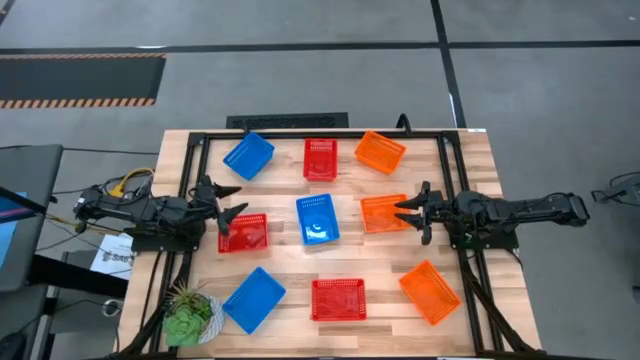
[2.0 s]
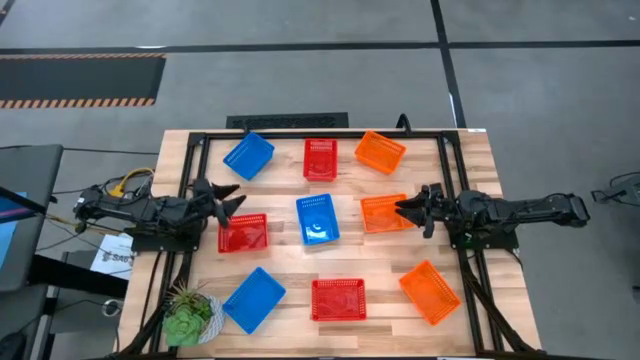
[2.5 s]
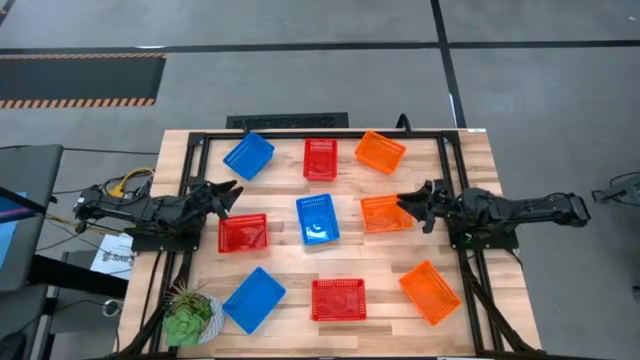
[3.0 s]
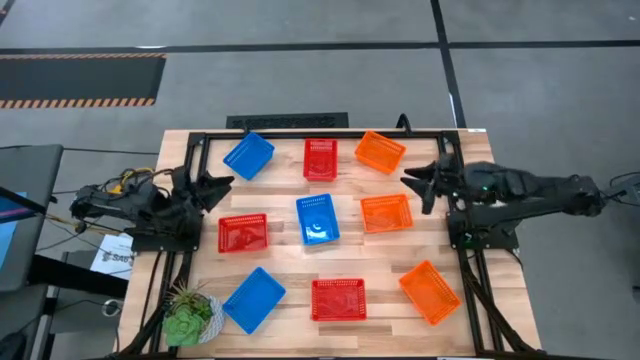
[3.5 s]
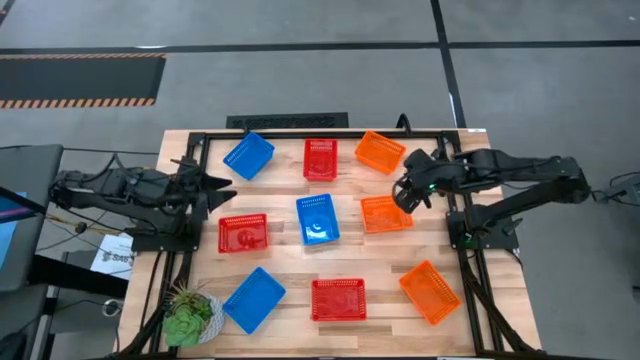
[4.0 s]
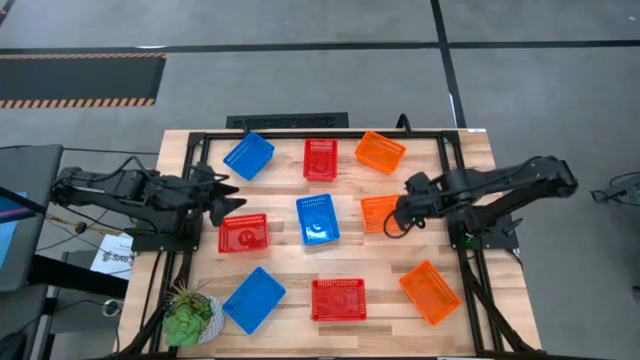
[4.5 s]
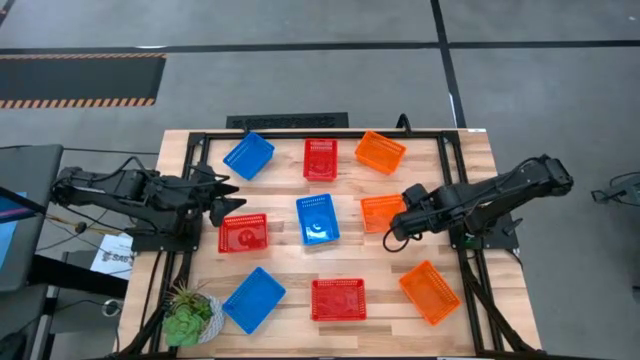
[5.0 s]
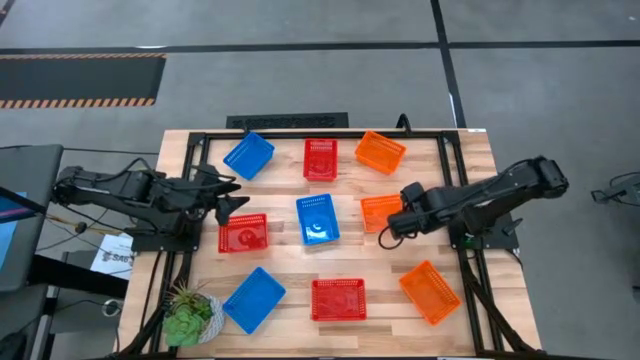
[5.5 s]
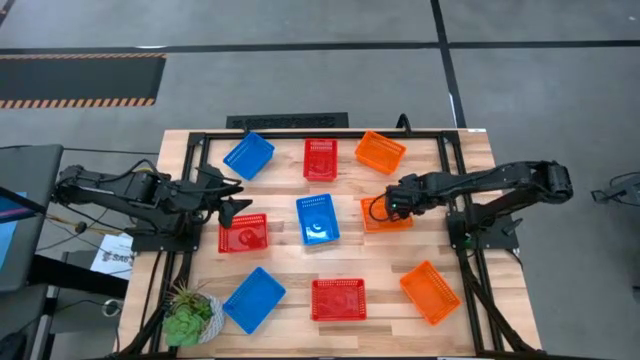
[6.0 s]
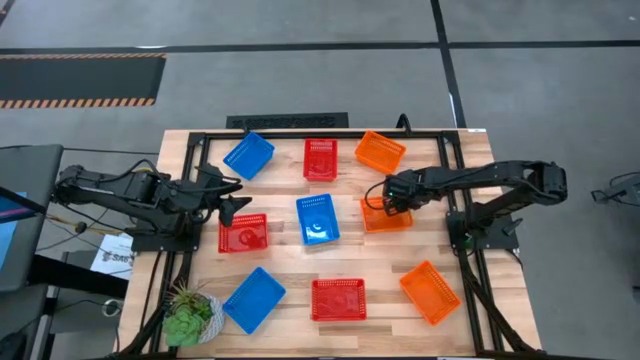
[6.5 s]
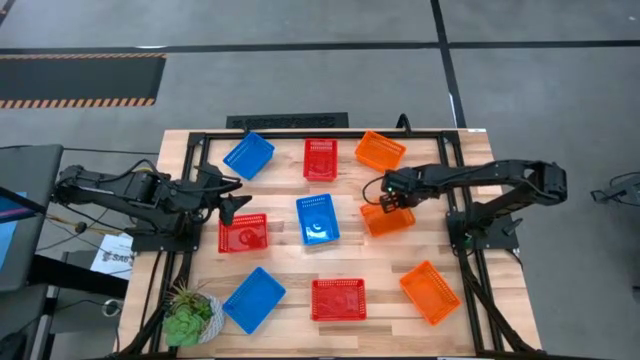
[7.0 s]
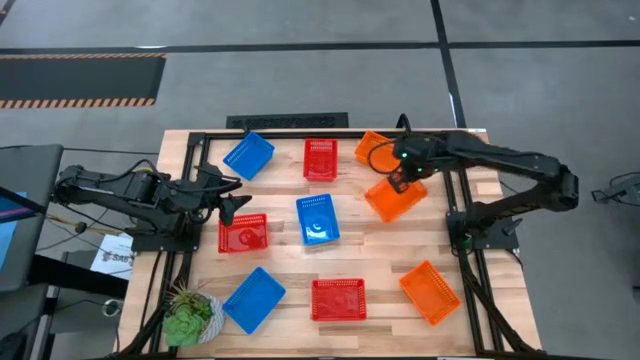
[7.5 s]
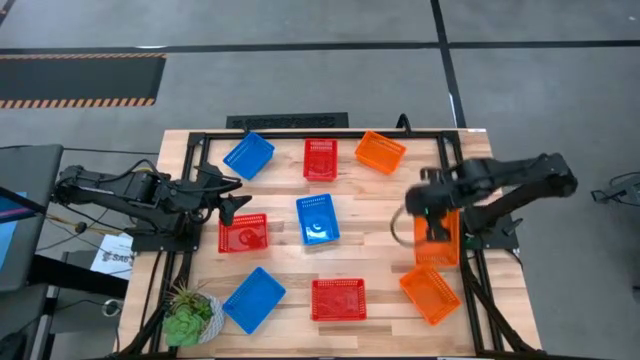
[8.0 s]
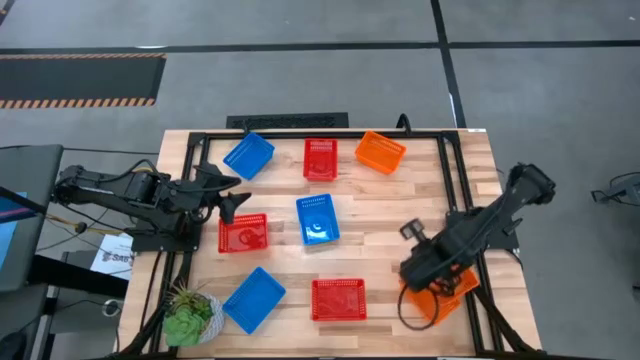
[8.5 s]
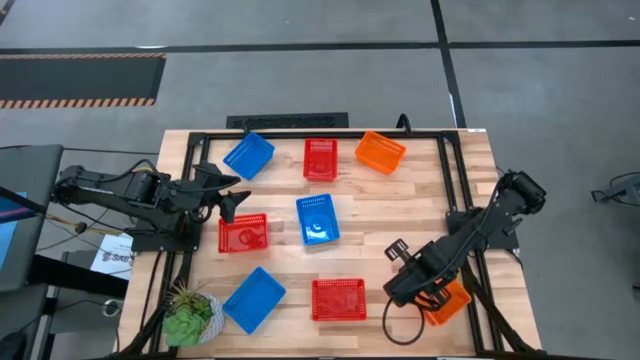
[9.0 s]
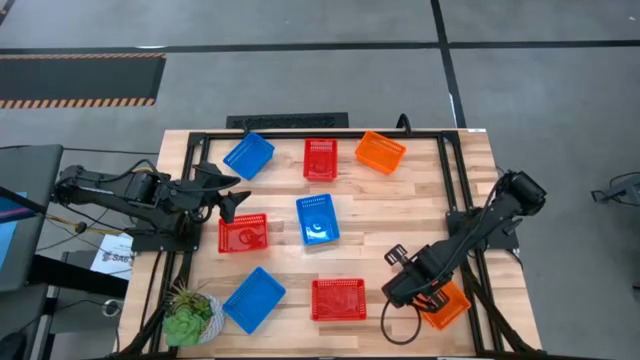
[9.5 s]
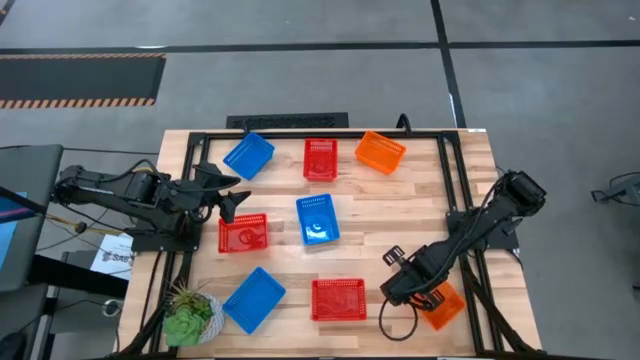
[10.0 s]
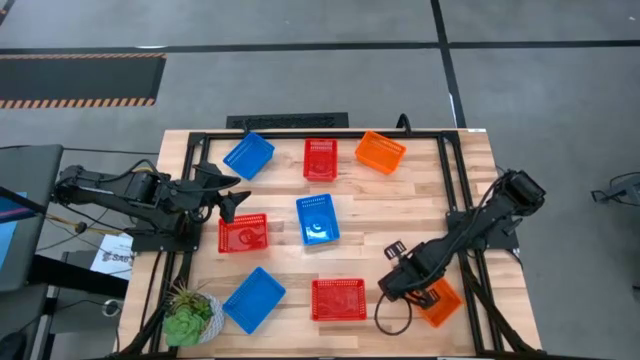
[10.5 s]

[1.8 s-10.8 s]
Stack the middle orange bin into the bottom orange bin

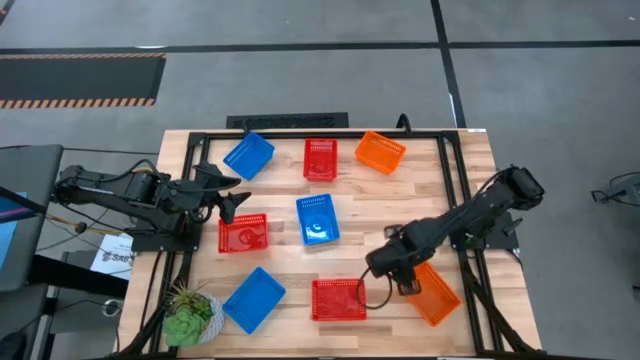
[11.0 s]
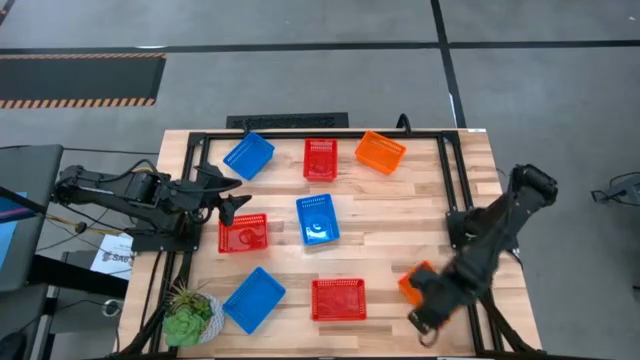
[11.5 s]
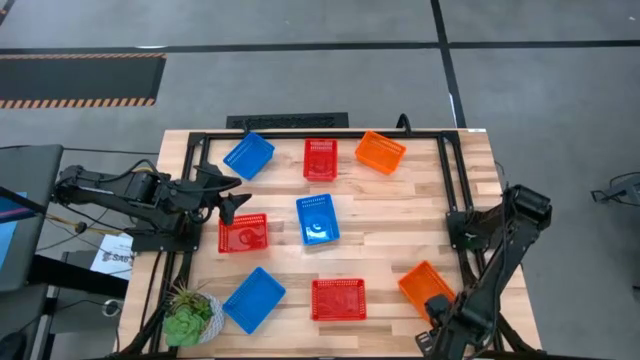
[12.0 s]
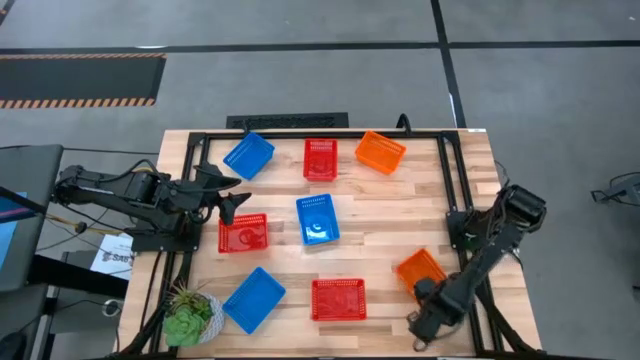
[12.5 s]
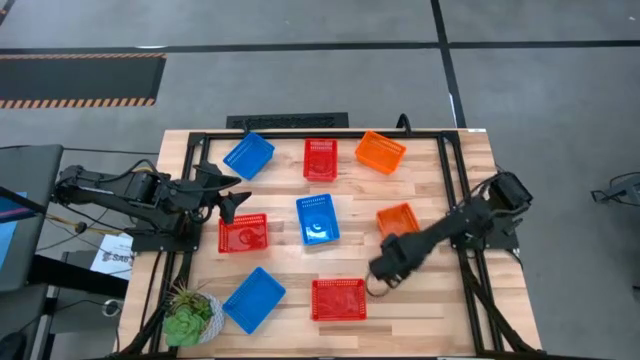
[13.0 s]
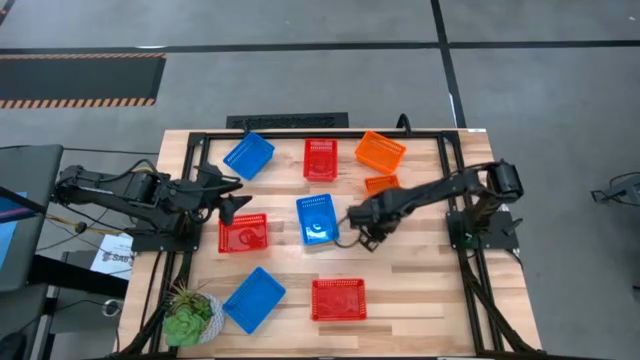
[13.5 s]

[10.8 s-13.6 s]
Move the stacked orange bins to the middle right of the table

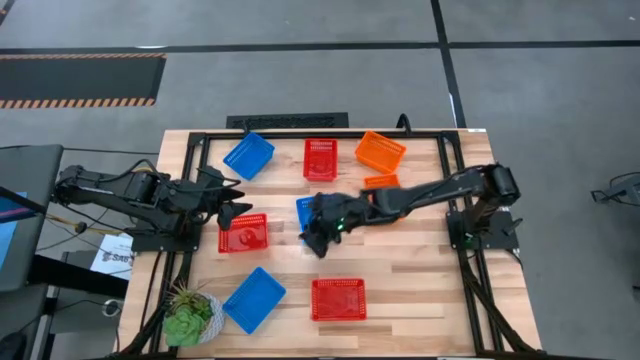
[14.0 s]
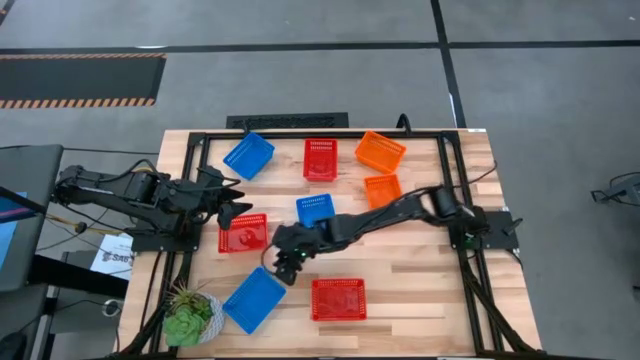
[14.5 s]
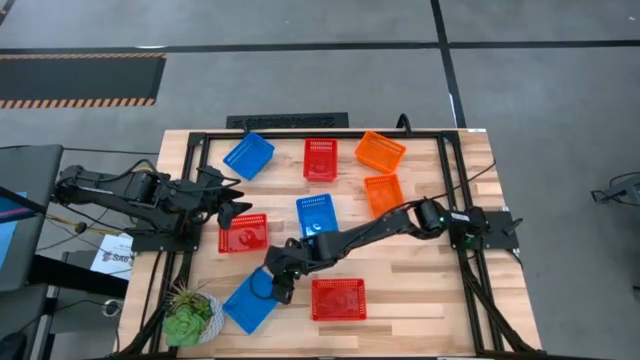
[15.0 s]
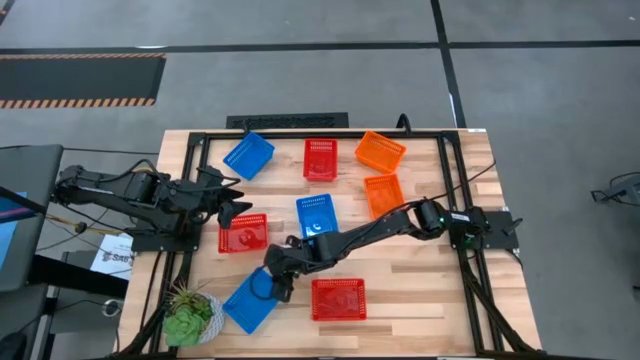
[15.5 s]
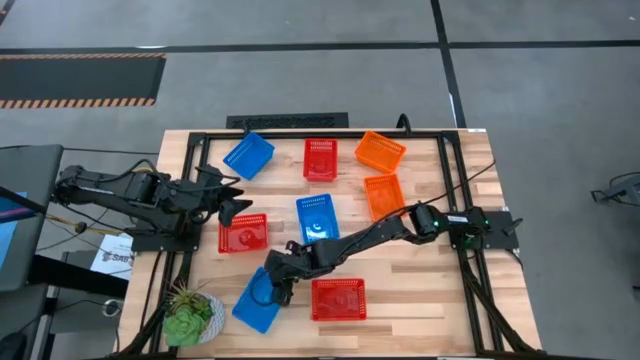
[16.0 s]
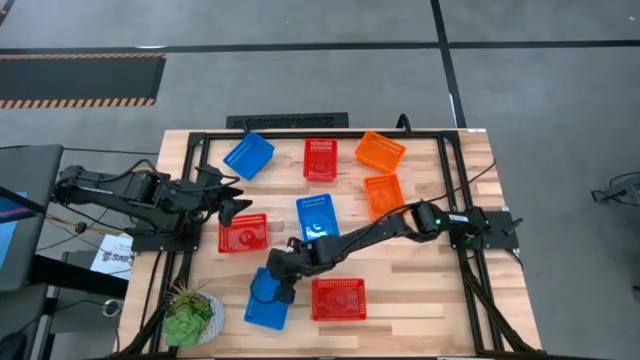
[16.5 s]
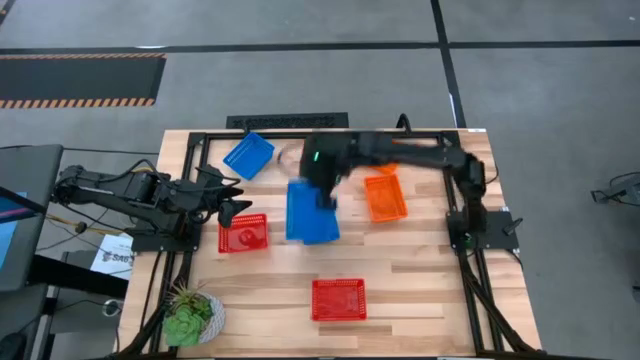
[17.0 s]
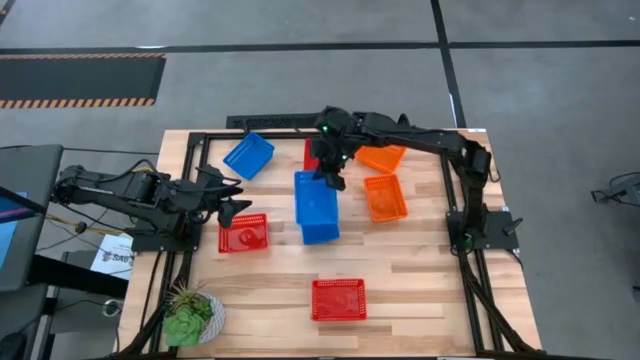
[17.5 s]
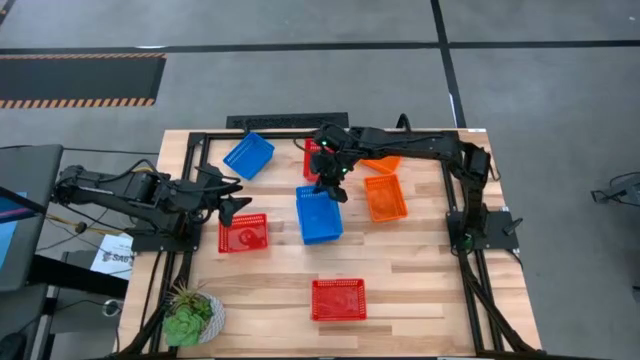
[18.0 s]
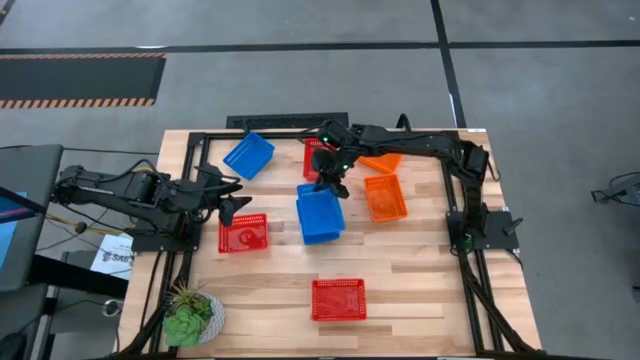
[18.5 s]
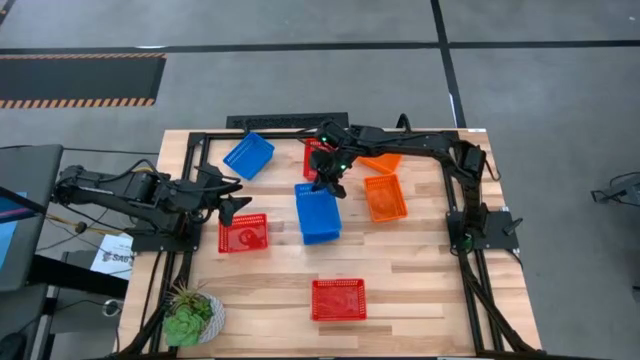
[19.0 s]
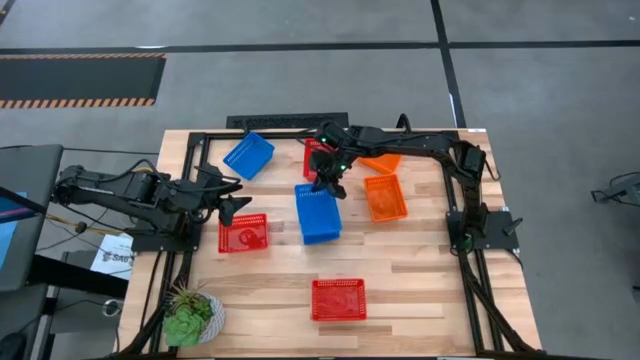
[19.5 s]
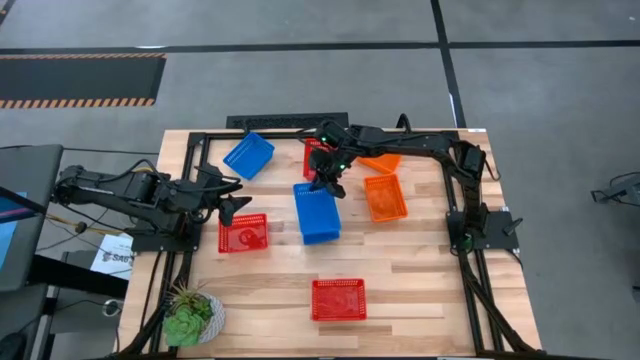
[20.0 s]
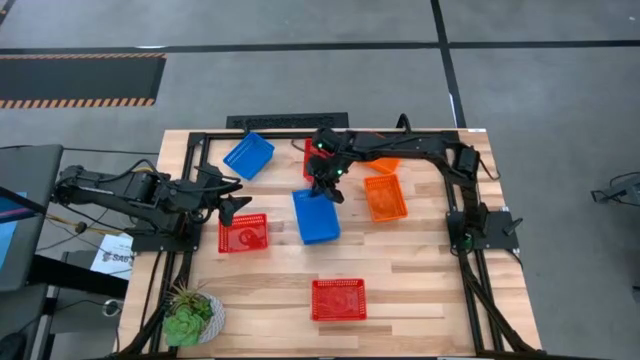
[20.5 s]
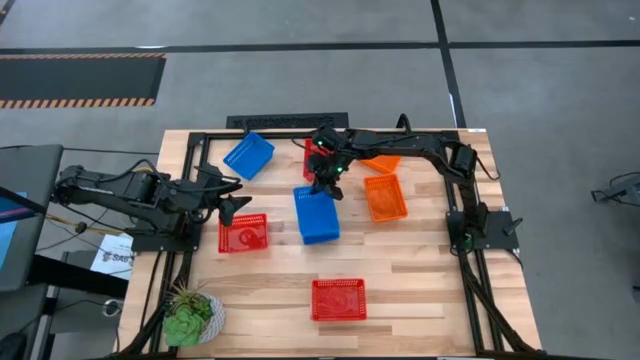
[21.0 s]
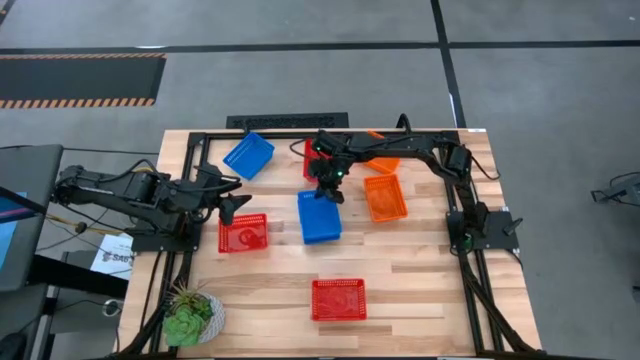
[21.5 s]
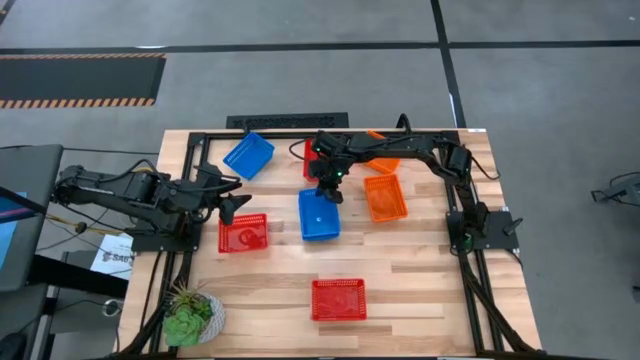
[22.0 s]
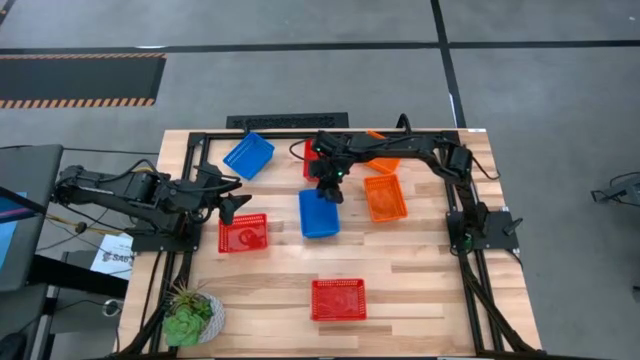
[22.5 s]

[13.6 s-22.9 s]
Stack the bottom blue bin into the right blue bin
